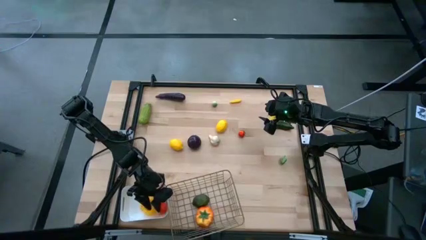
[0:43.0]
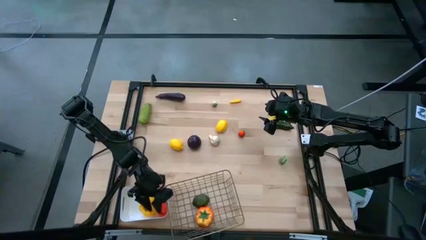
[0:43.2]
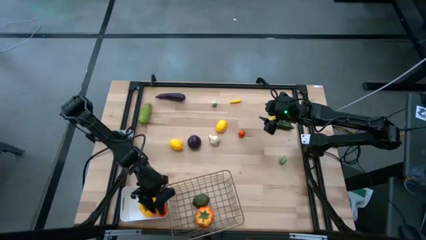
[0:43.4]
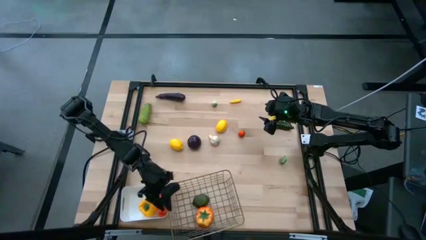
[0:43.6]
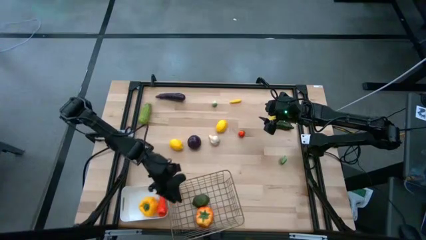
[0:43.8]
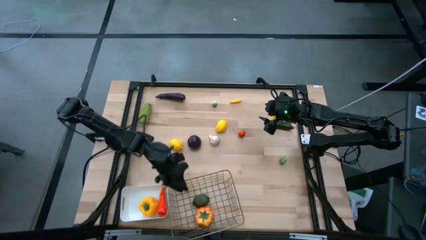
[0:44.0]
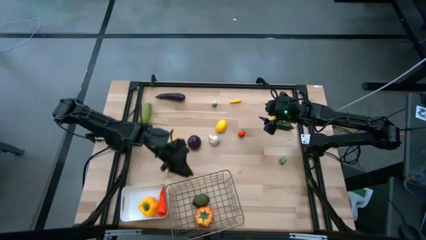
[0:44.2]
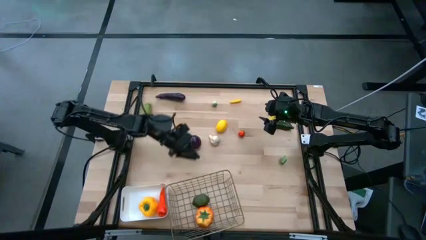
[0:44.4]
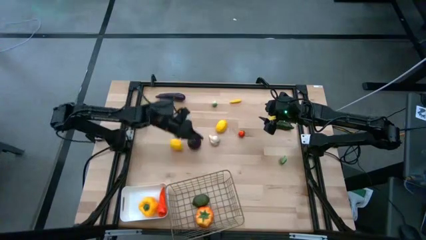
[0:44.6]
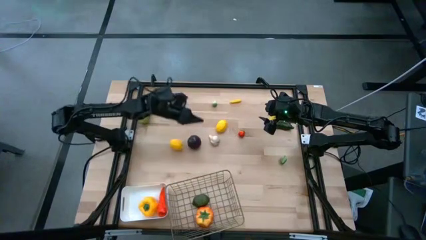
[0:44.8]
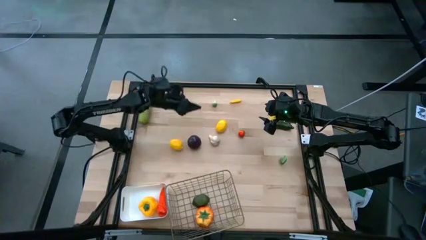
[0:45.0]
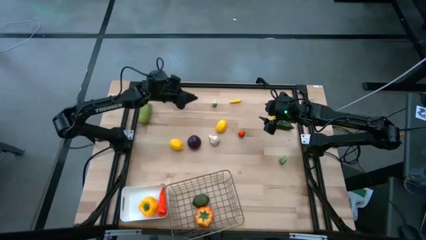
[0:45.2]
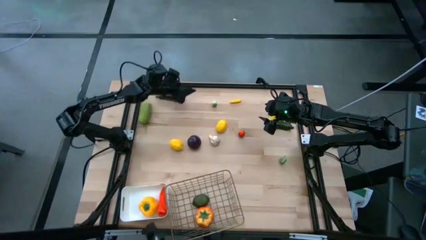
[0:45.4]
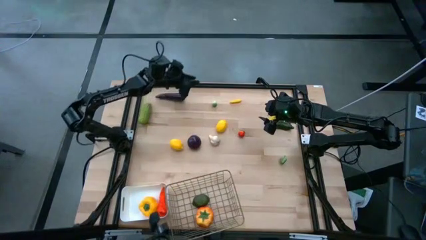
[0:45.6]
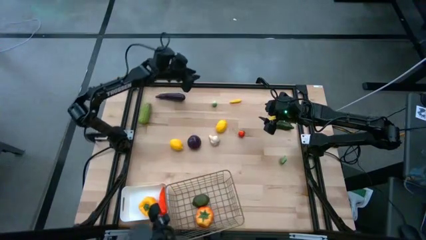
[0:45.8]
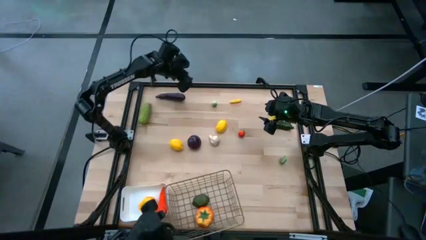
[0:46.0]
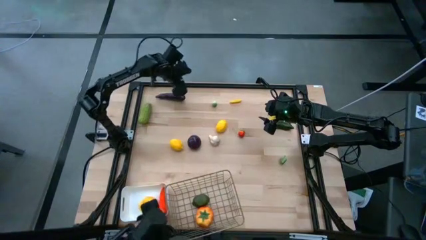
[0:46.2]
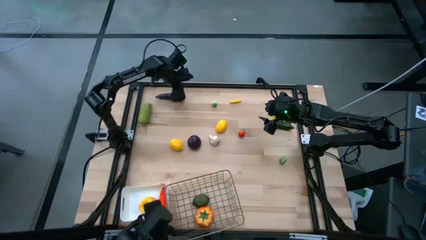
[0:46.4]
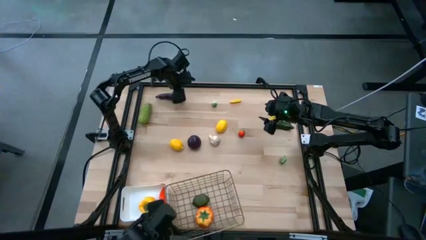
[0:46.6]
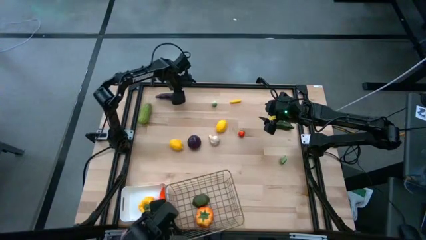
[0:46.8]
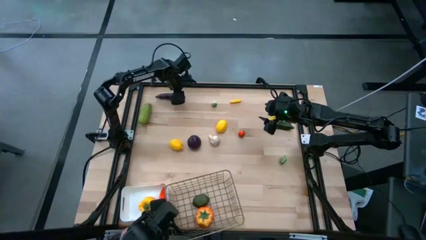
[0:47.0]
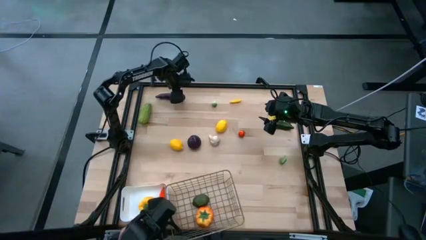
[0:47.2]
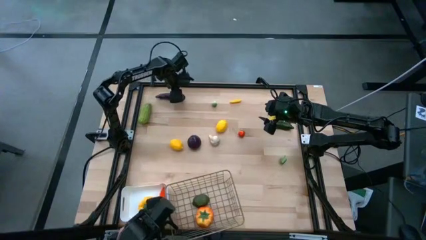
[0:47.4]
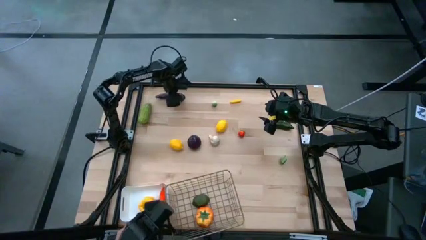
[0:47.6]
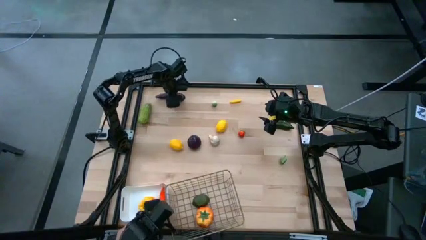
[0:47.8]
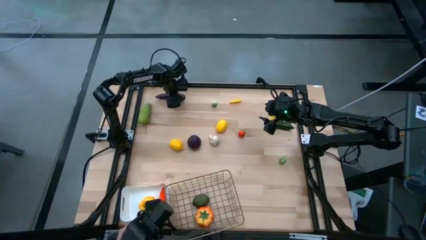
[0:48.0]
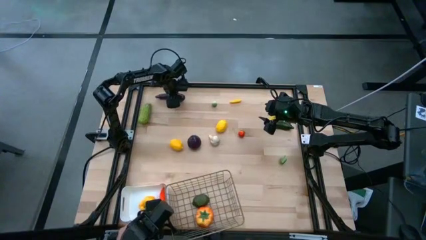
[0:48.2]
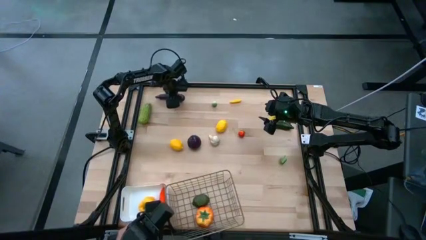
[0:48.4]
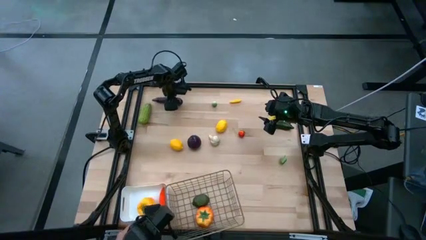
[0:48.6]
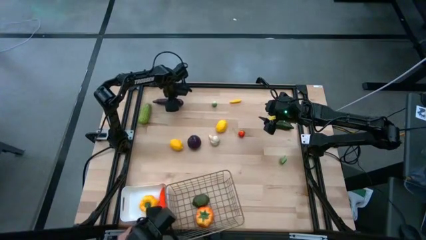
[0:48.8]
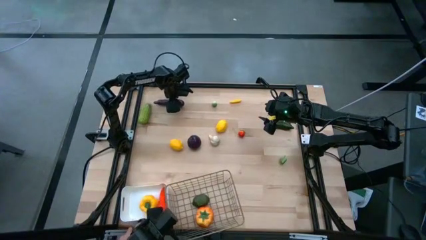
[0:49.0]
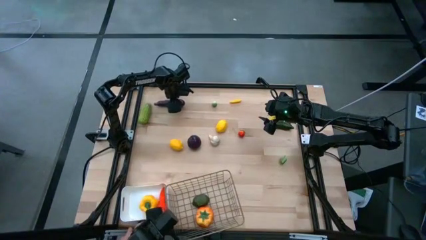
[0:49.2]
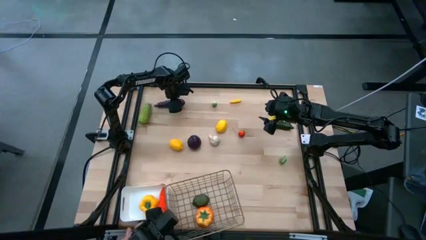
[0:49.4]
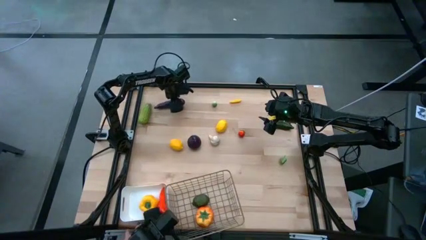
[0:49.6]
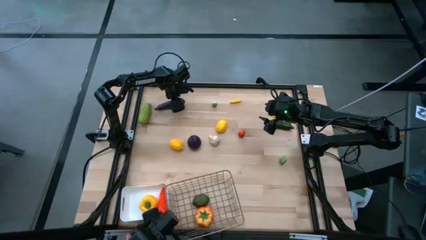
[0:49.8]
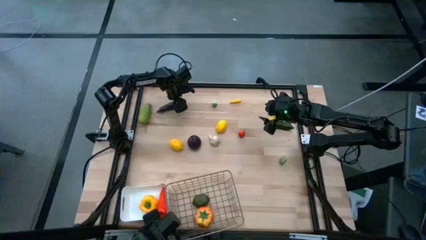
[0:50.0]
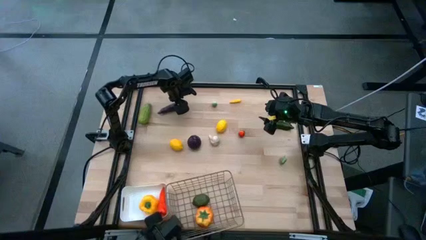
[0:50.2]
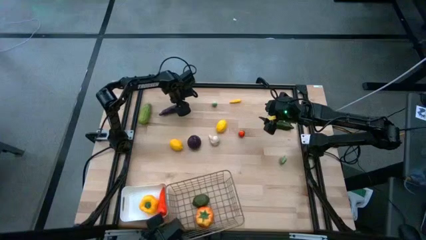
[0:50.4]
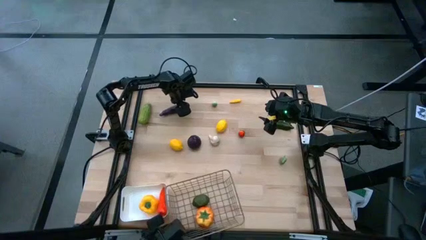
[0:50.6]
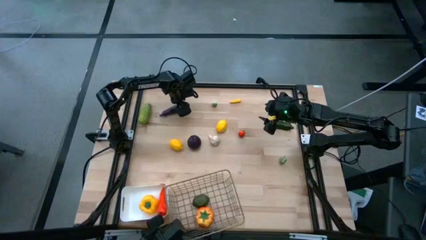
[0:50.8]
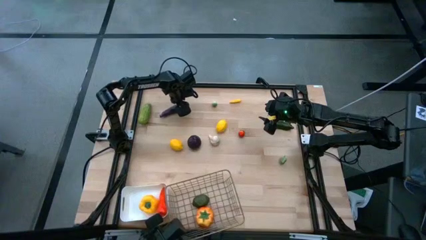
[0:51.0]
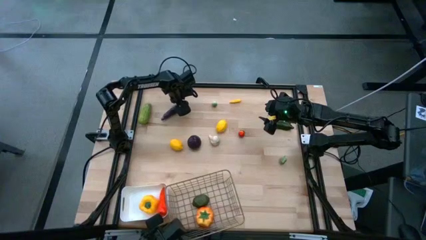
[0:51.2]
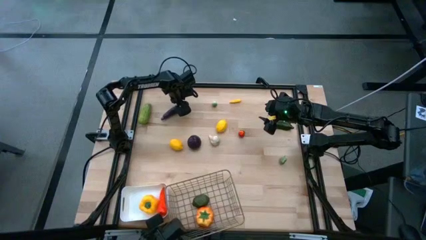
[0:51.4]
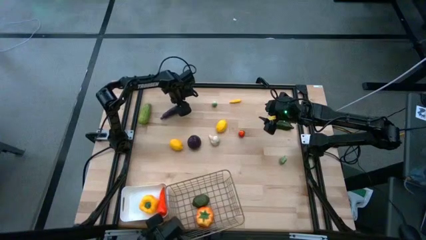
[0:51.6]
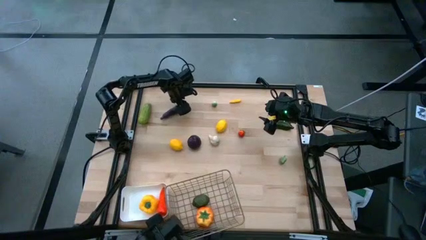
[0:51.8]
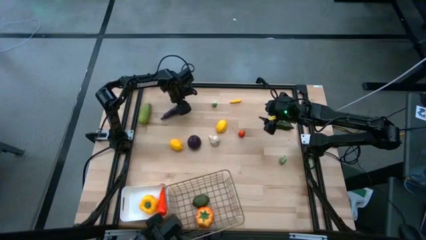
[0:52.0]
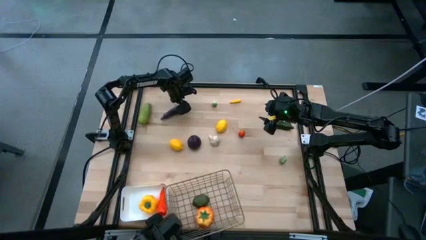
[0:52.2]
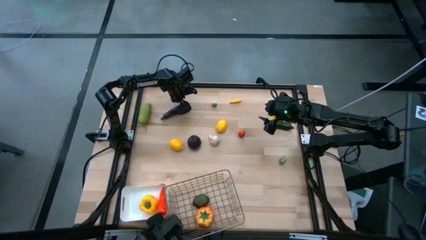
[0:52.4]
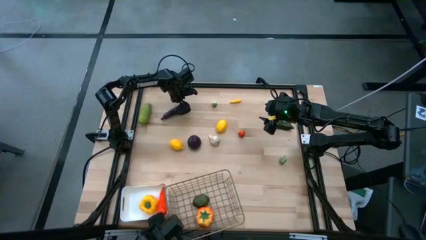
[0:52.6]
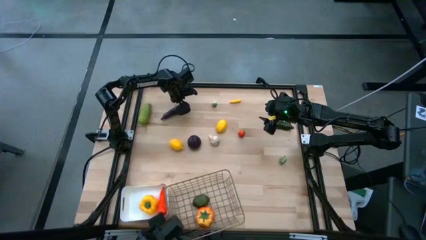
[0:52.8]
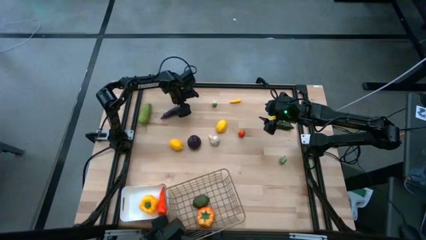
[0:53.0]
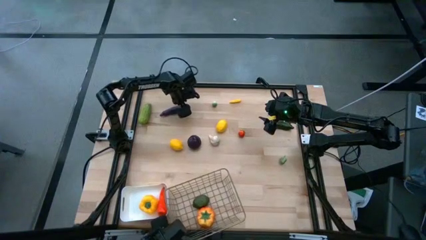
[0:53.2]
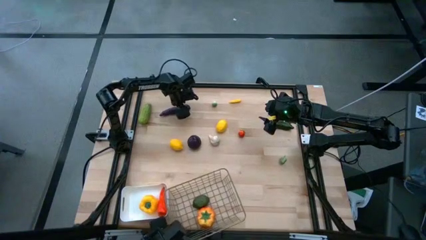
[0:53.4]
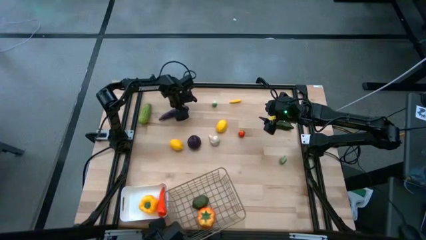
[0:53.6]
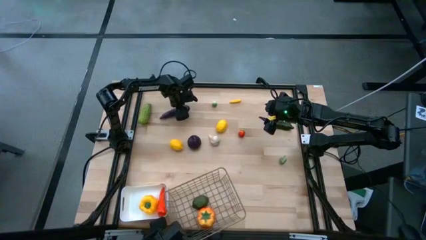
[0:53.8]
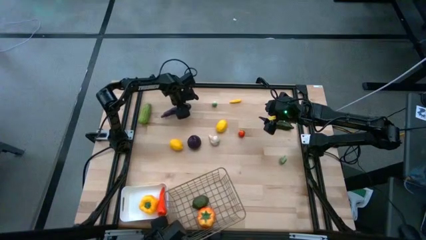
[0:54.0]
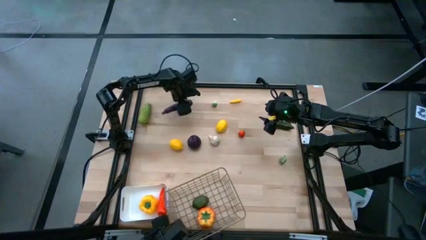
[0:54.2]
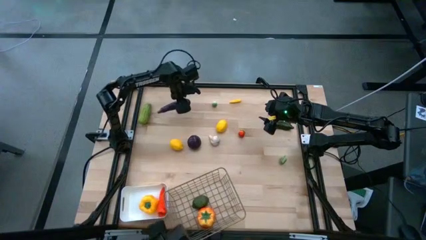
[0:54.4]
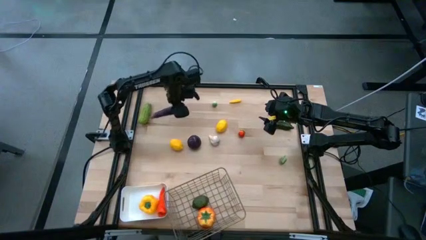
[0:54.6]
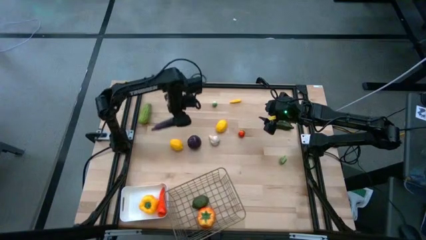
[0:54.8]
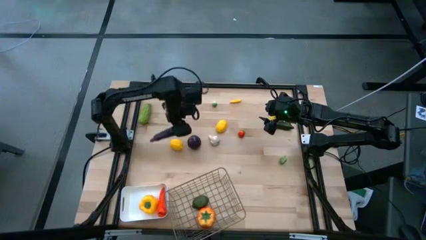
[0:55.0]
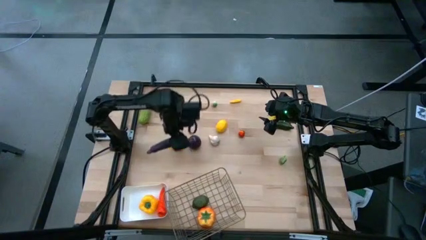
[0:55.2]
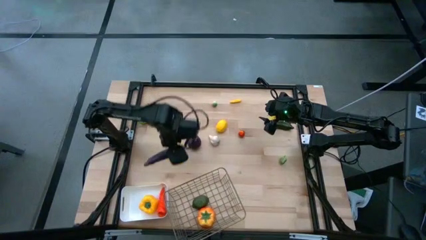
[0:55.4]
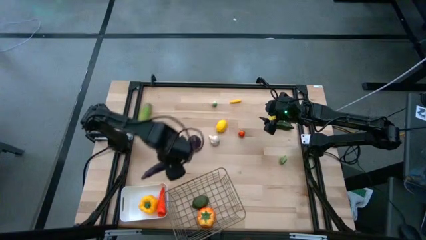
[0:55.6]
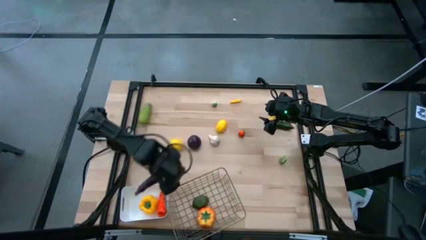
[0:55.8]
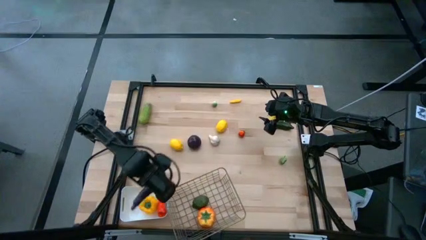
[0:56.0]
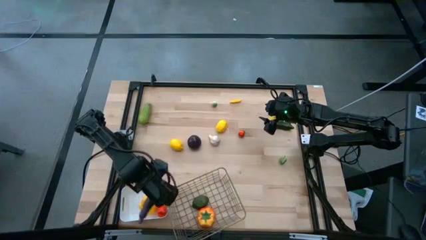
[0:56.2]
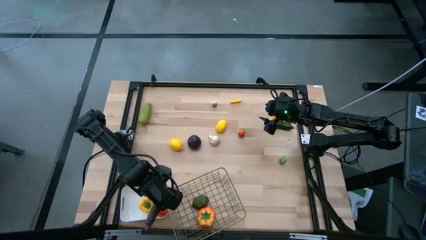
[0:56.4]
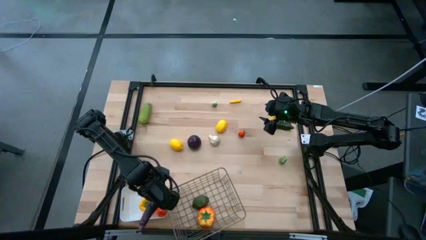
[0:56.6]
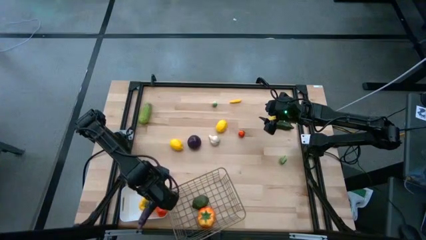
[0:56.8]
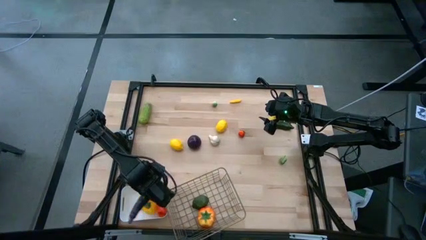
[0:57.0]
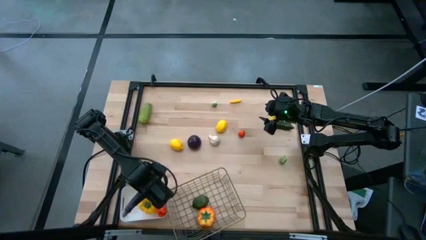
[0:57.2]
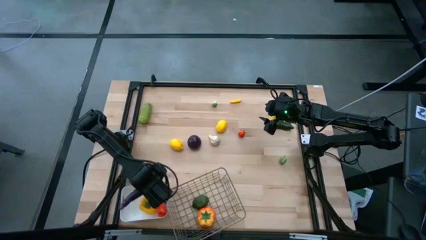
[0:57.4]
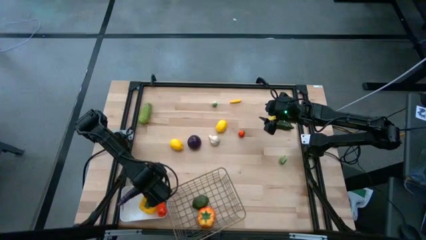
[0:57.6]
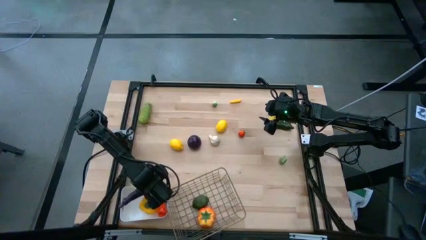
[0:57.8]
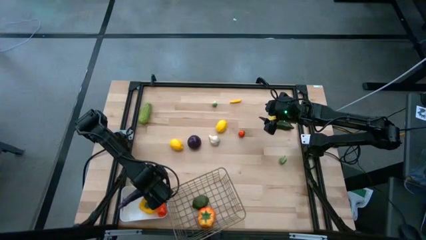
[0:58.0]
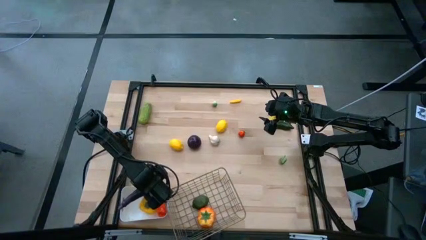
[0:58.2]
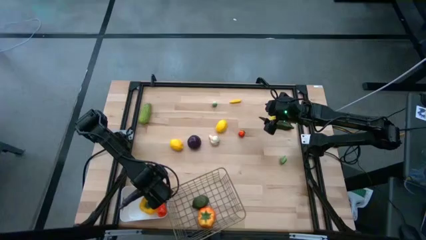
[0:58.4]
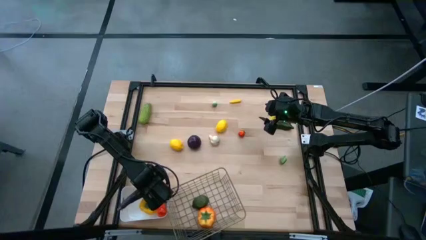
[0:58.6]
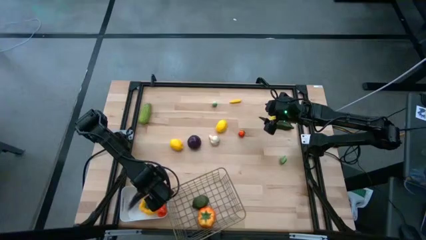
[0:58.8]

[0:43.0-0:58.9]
Task: Sort produce into baskets
Put the black eggplant into the white bin
